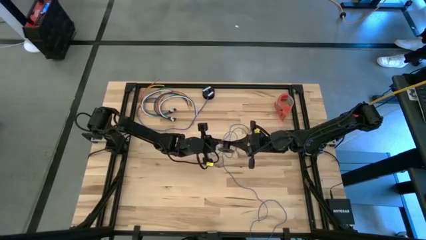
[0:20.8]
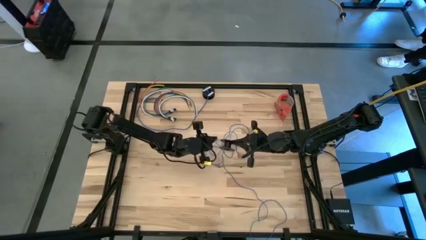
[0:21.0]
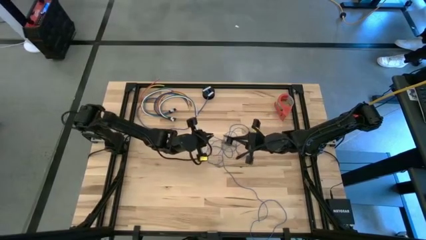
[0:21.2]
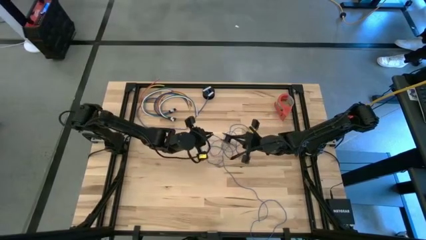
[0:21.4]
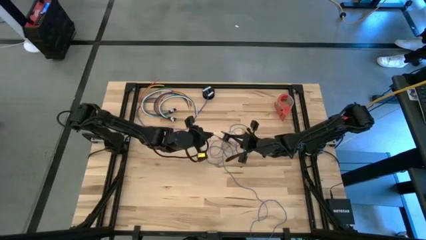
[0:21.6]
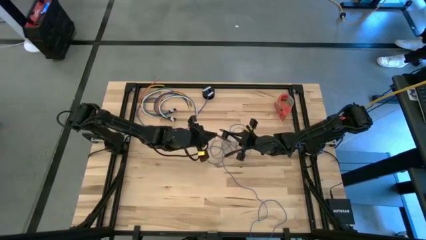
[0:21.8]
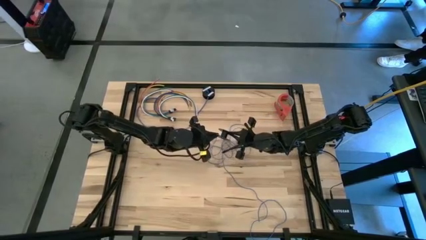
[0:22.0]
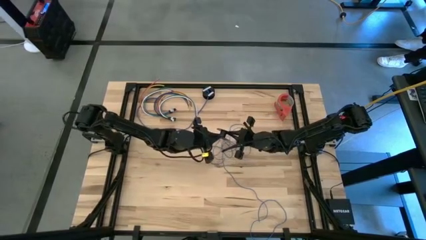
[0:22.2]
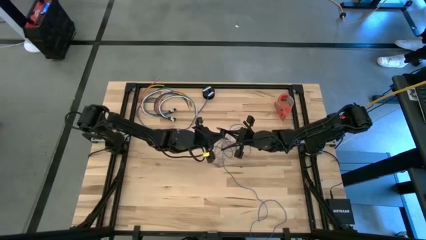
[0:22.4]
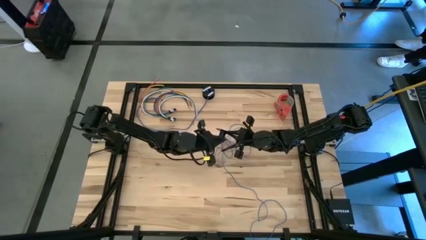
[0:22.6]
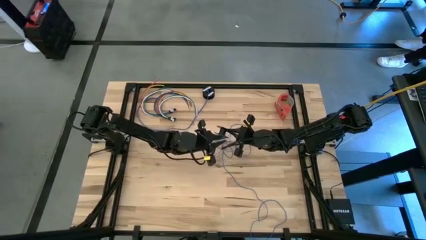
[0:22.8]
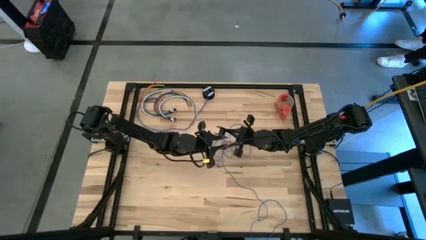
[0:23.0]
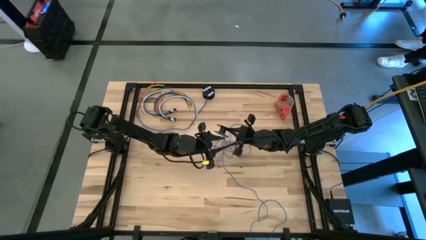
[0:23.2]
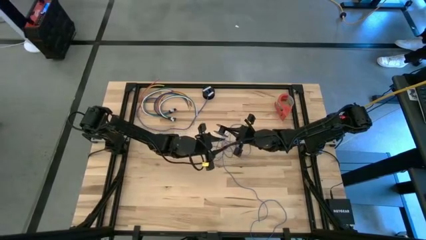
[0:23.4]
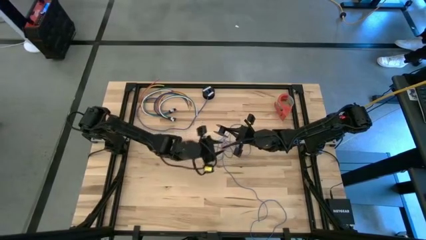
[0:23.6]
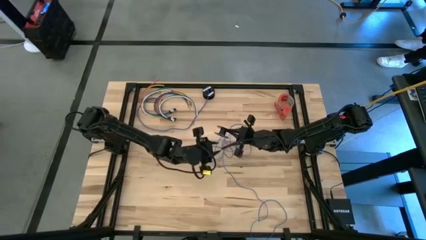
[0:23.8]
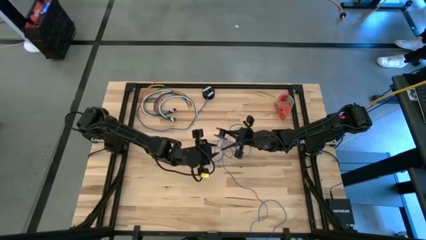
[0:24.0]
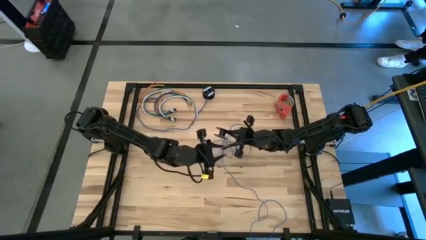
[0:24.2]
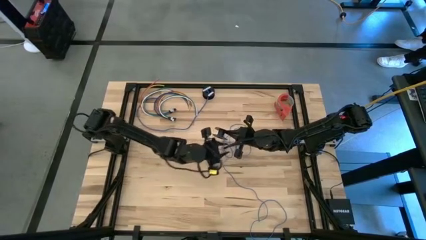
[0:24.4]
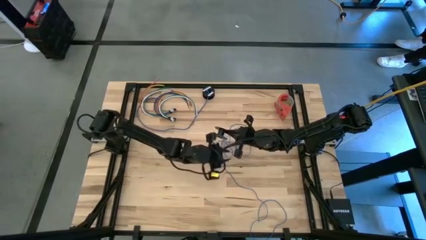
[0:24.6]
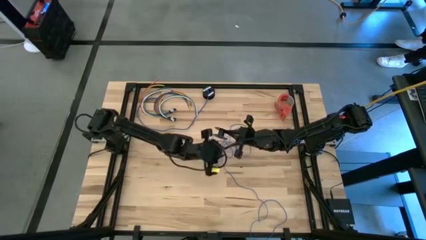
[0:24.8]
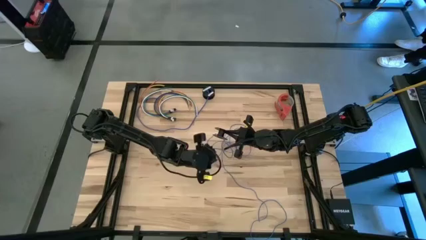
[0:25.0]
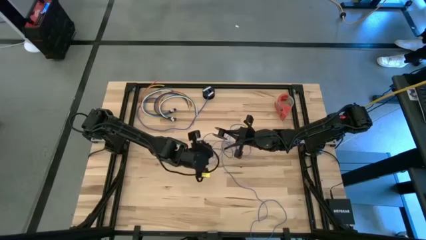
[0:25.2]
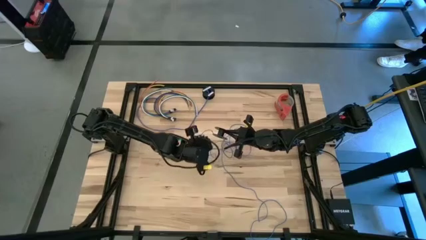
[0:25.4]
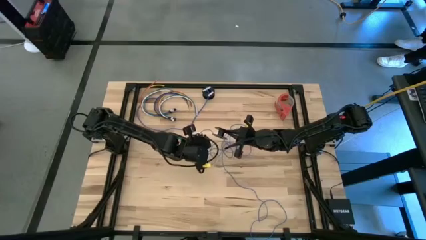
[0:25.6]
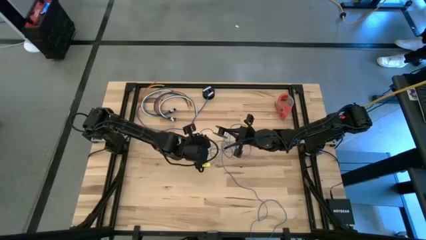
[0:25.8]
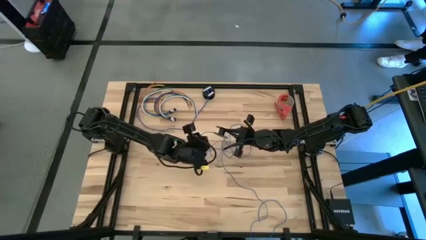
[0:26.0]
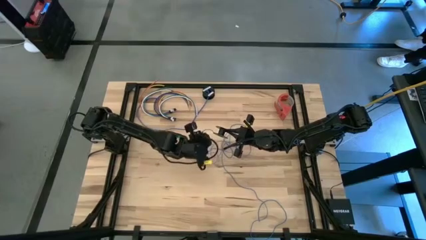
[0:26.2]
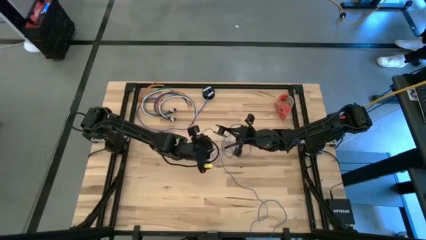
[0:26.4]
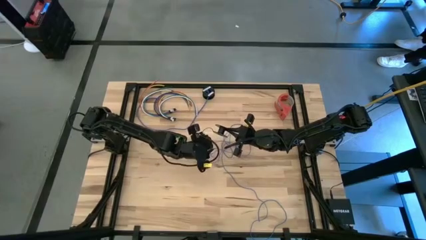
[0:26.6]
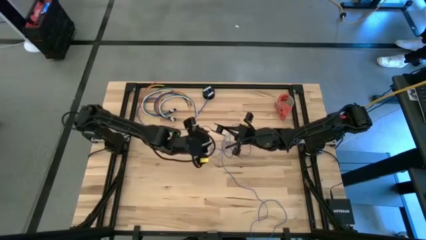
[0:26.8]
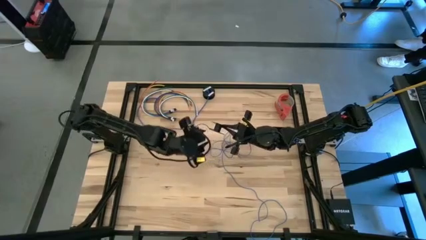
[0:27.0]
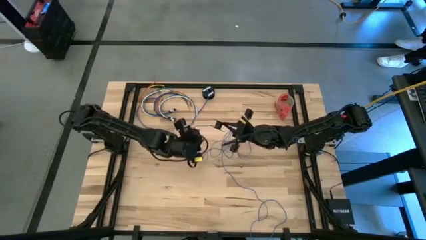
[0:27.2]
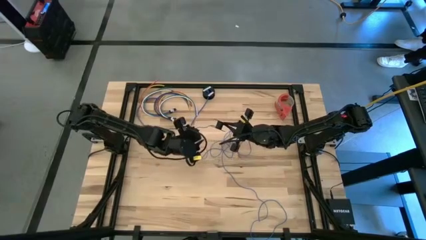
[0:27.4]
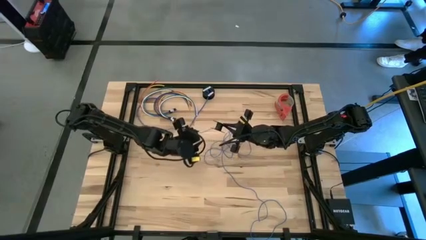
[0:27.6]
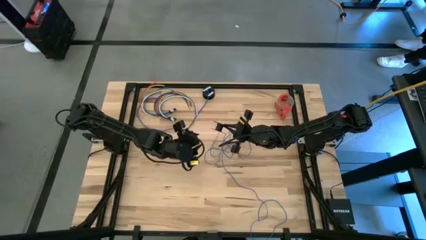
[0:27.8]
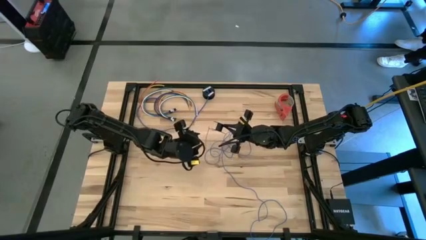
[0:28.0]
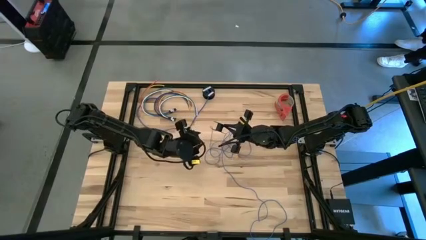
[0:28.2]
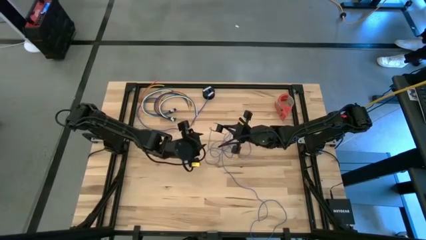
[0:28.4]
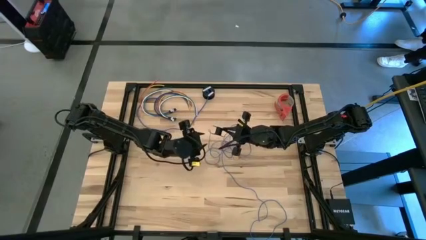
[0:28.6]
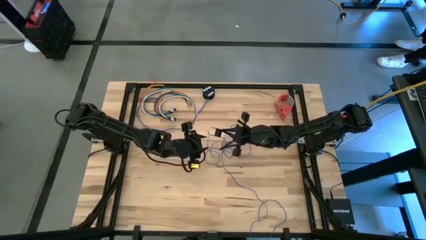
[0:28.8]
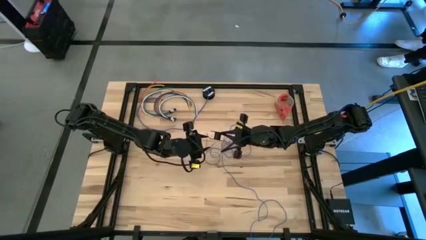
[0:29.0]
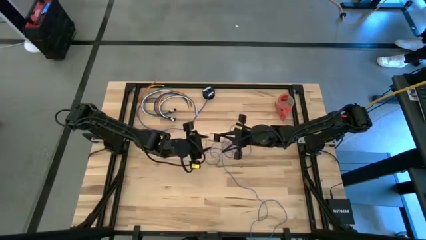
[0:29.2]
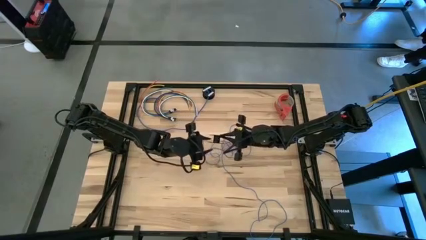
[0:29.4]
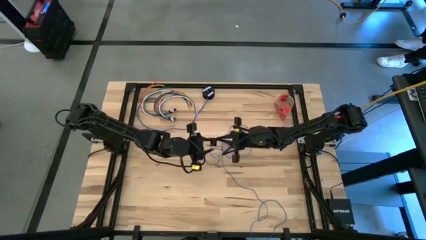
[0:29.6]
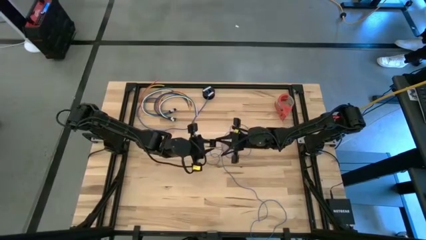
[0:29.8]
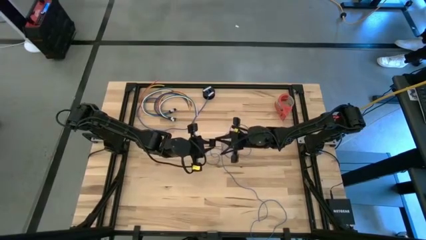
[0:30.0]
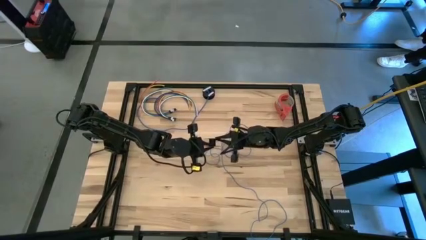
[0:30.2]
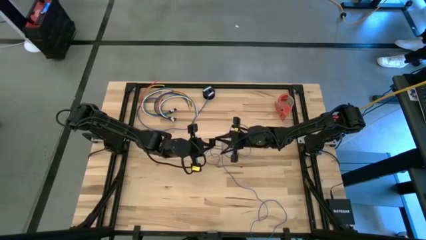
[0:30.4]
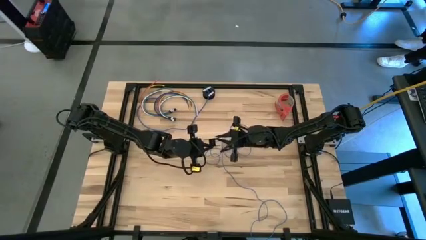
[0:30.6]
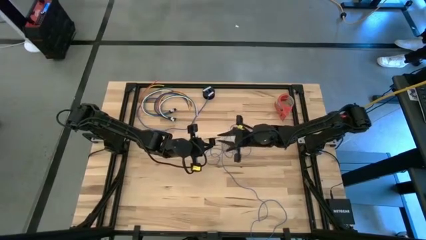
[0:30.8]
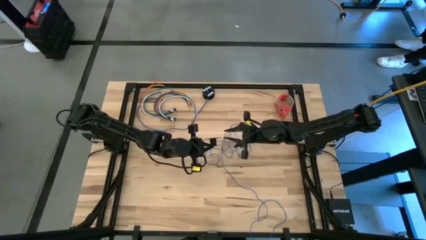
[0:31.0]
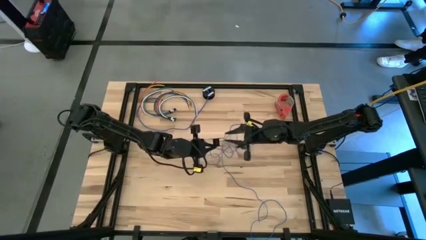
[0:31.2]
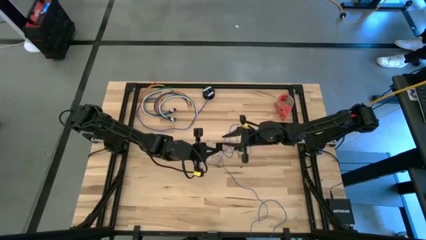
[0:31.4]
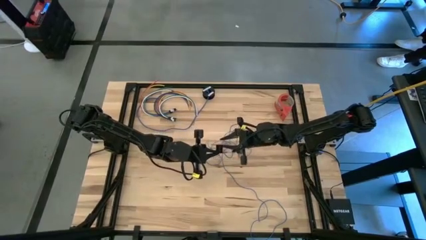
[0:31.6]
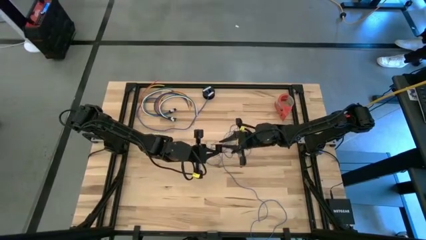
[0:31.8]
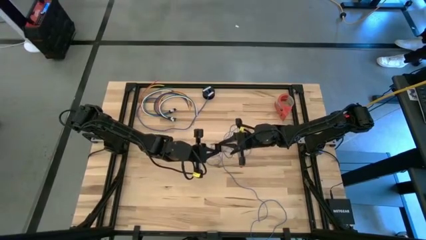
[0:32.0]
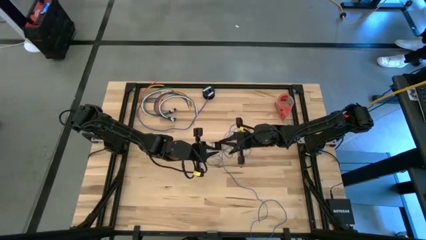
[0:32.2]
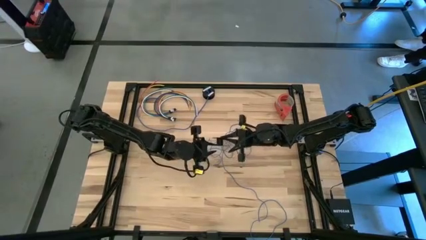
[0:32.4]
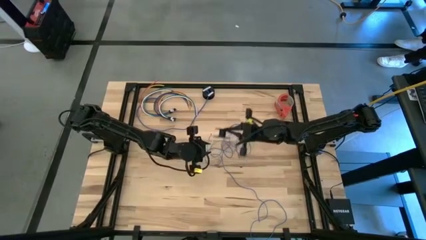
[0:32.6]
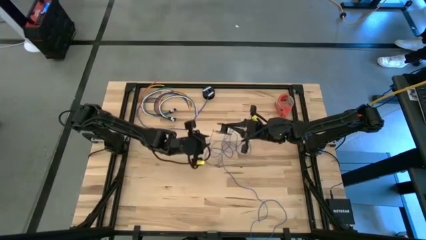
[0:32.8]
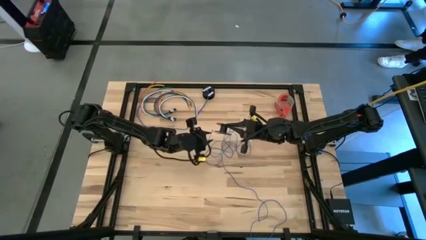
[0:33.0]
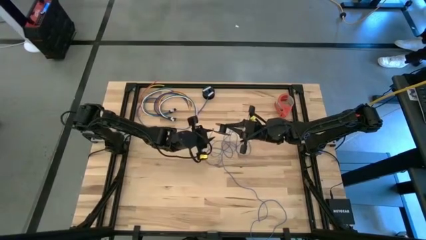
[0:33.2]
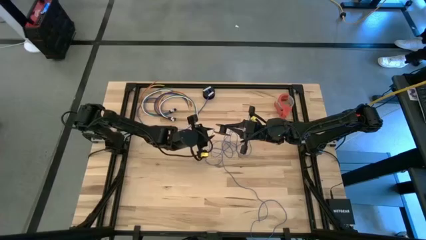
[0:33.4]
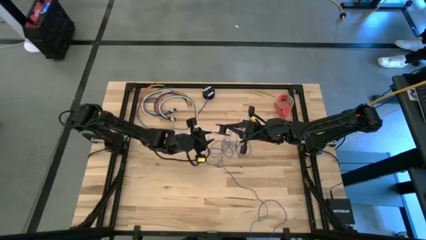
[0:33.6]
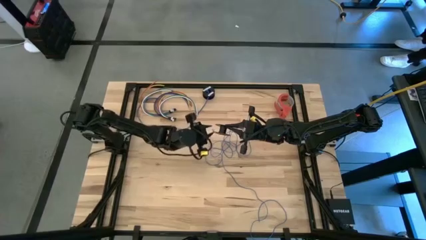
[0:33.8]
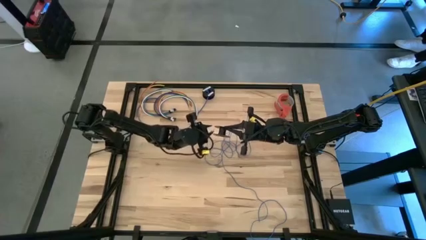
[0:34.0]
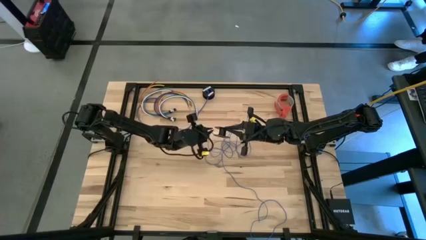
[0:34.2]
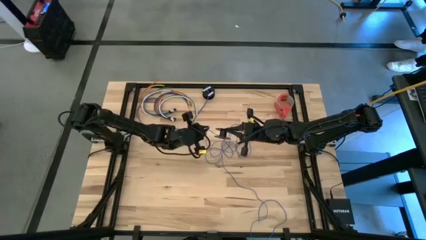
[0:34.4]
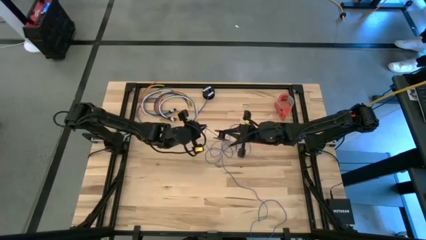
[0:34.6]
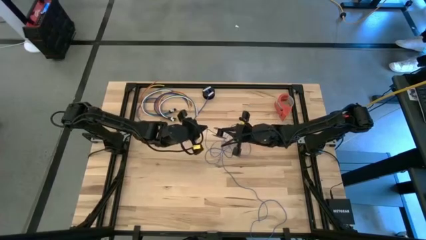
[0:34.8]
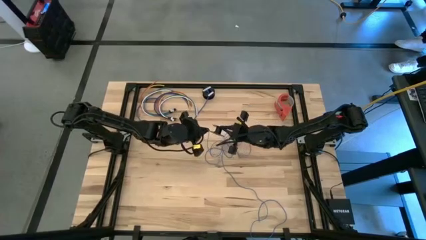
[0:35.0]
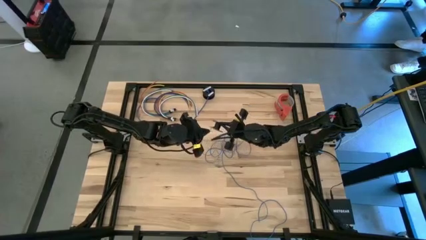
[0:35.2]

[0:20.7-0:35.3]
Task: Coil cords
Coil the blue wire onto the black spool

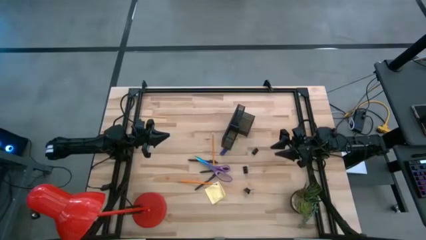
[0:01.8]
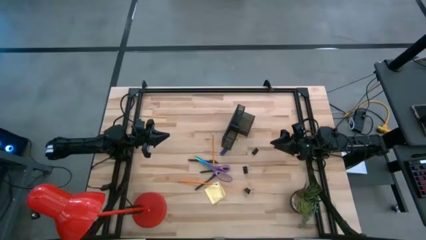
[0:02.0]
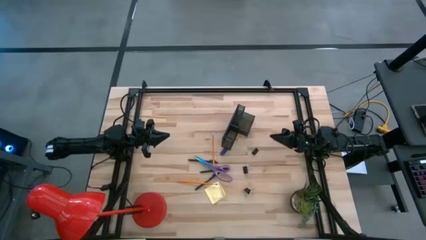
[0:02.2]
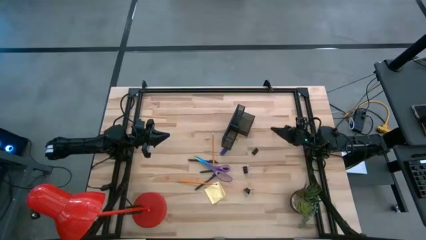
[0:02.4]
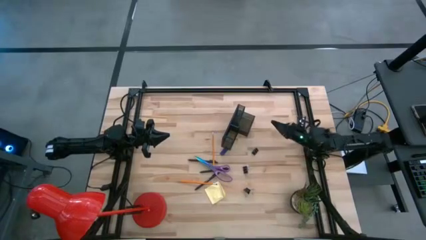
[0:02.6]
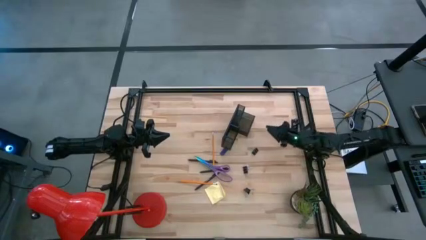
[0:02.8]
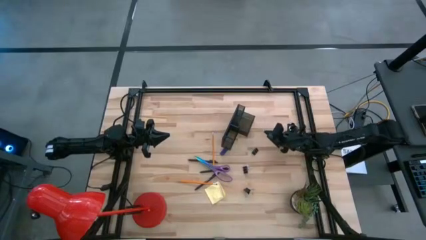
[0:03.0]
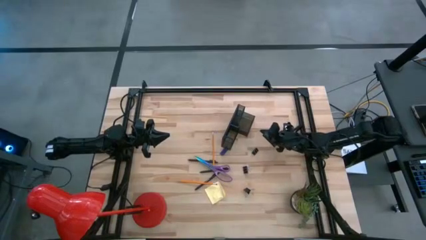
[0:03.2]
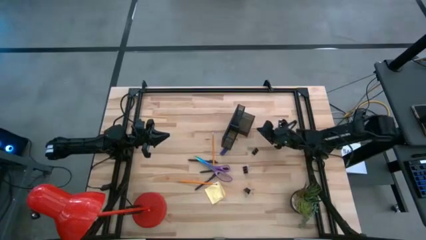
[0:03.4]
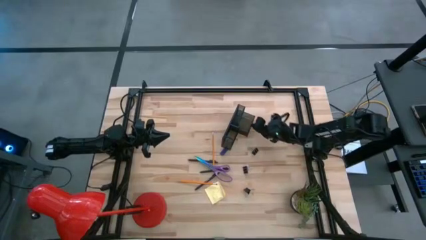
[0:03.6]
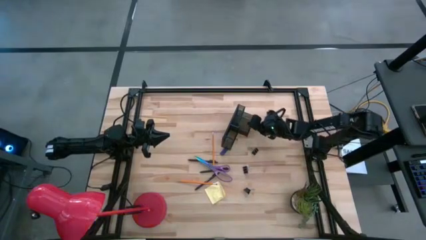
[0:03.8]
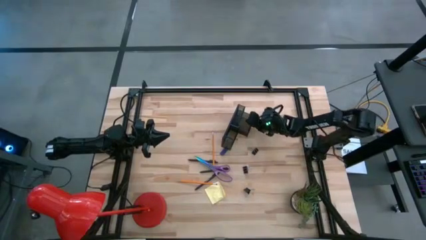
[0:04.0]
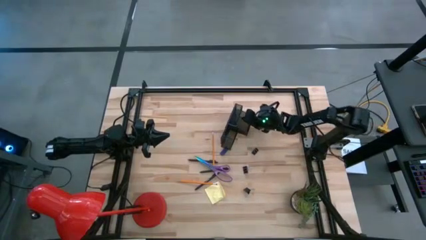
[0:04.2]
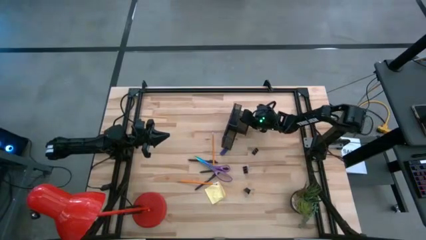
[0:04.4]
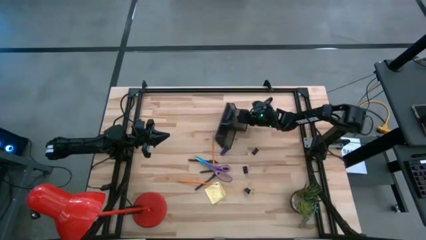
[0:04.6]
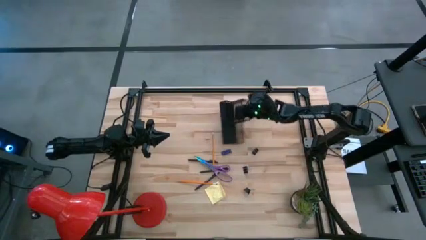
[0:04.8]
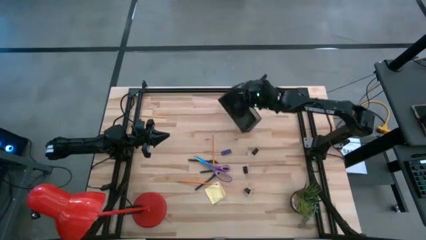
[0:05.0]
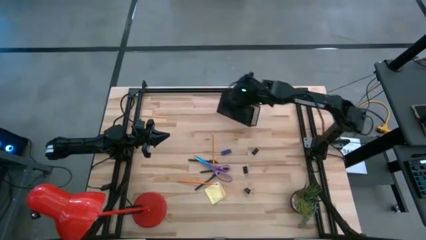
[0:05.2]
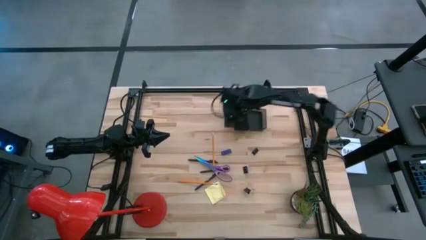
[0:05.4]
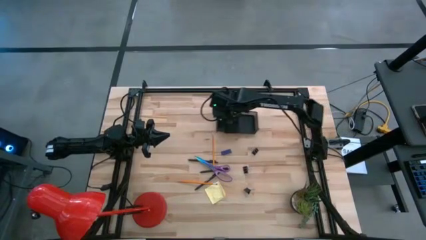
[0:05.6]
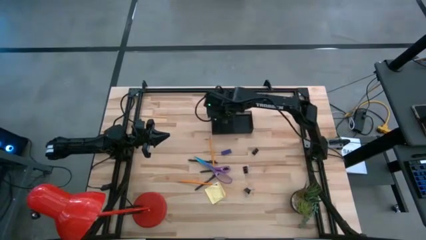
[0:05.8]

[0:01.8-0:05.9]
Task: Pick and place office supplies into organizer
Prepare the desk organizer
